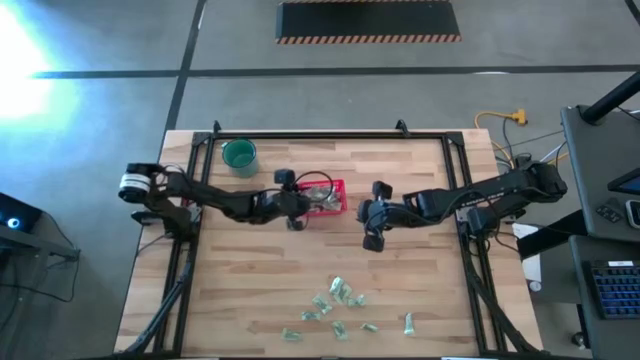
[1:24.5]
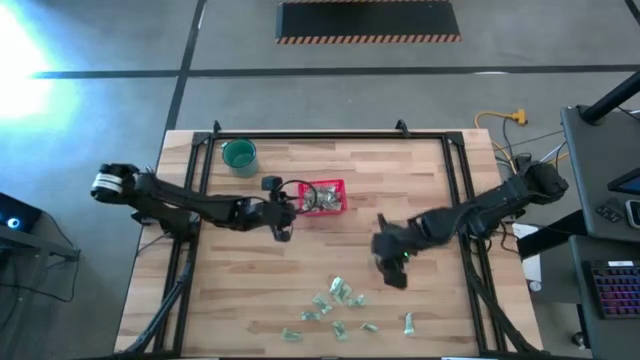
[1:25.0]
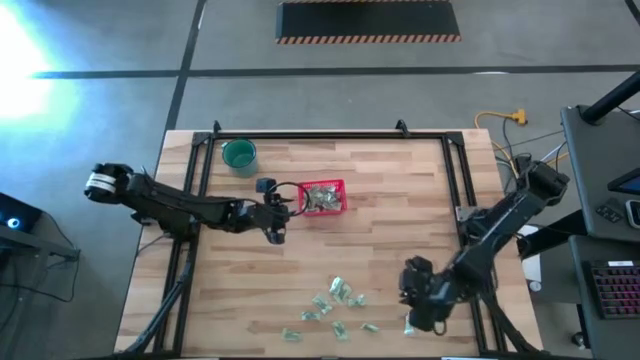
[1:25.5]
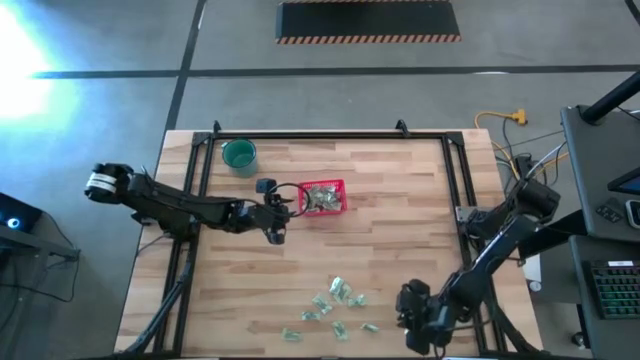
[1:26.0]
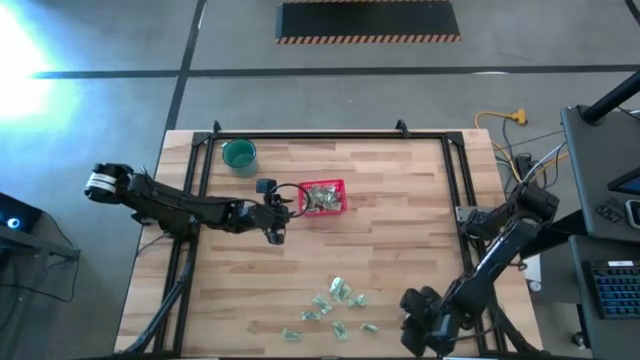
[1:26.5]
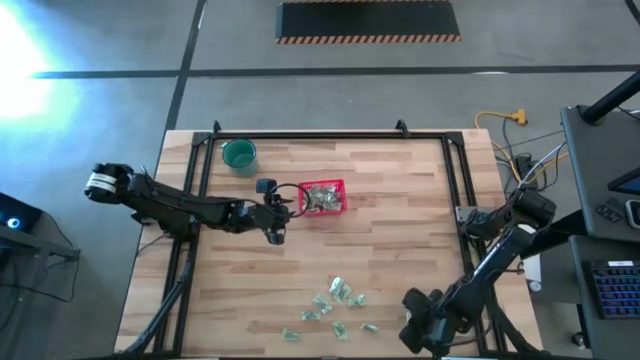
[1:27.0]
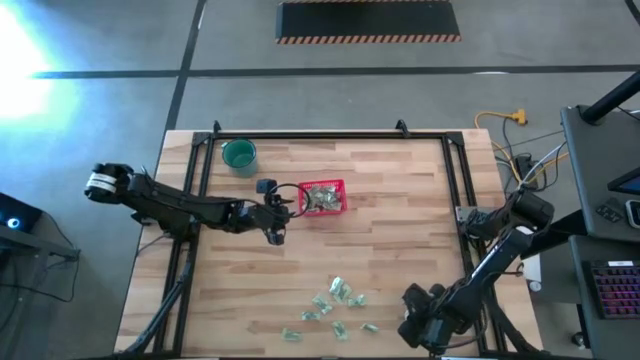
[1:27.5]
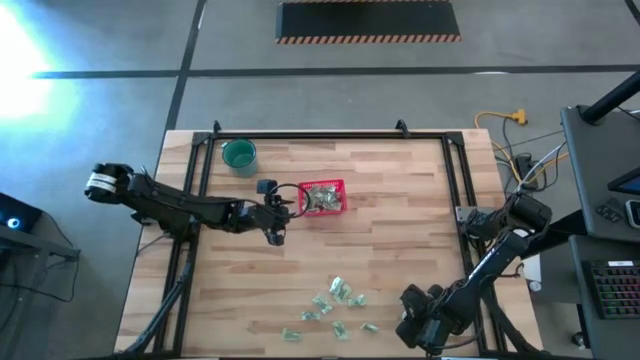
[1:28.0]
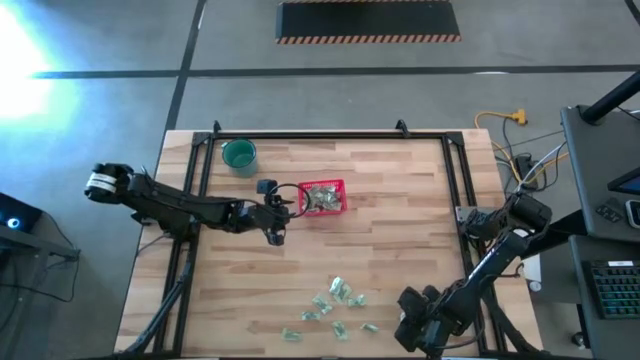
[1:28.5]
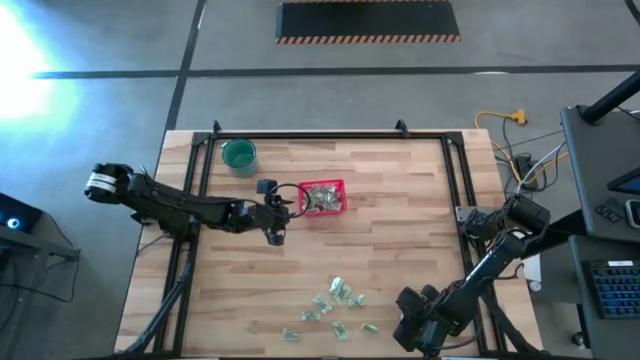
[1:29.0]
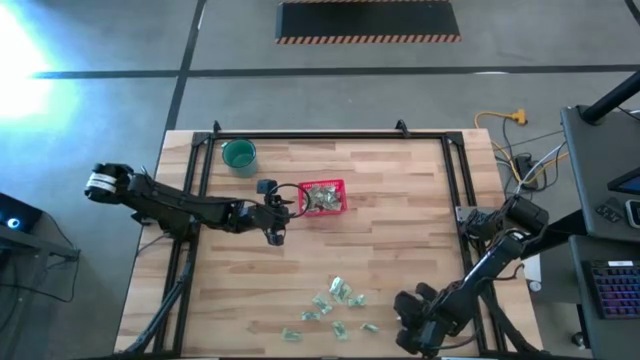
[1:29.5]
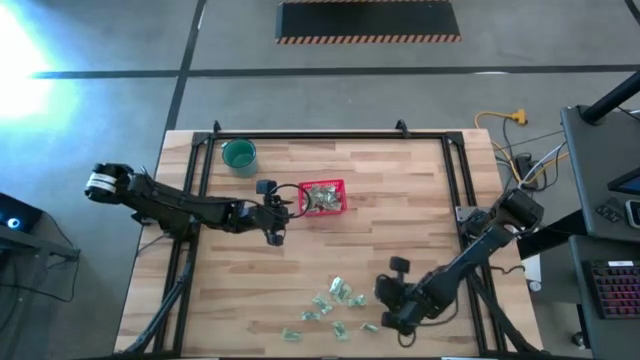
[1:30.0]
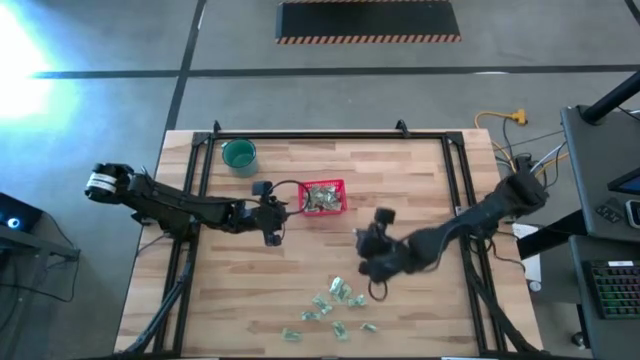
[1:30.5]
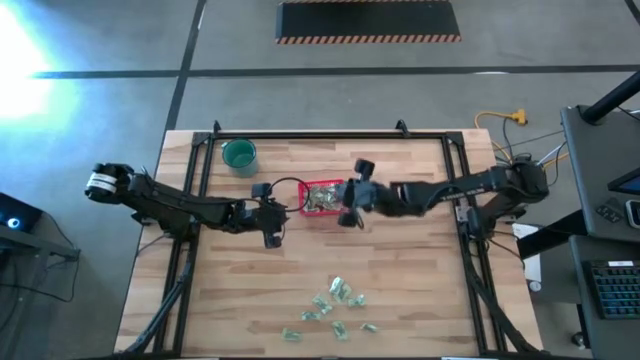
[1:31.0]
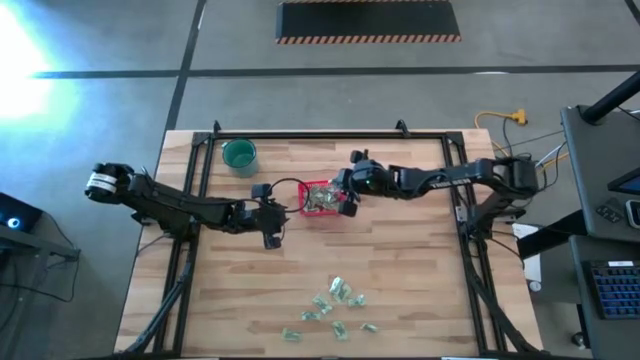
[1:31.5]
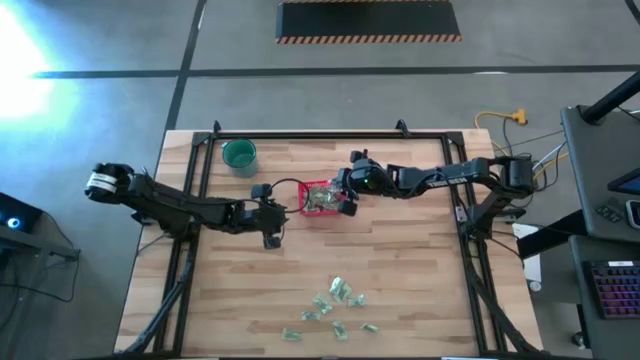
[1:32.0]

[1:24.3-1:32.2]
Task: Pick and place items into bin
Put the stevia packet into the red bin

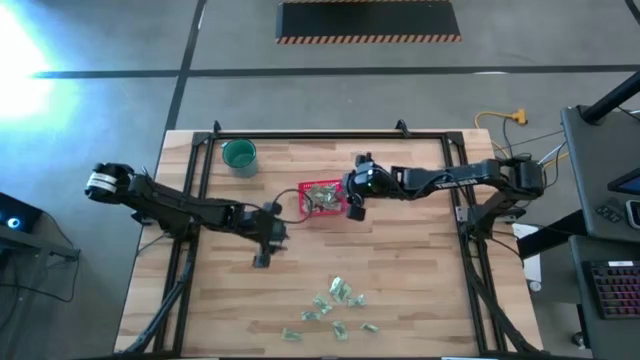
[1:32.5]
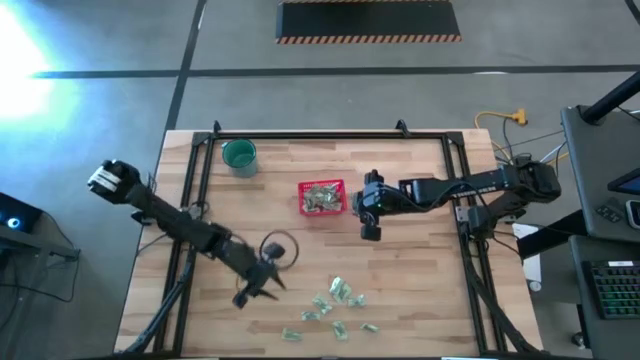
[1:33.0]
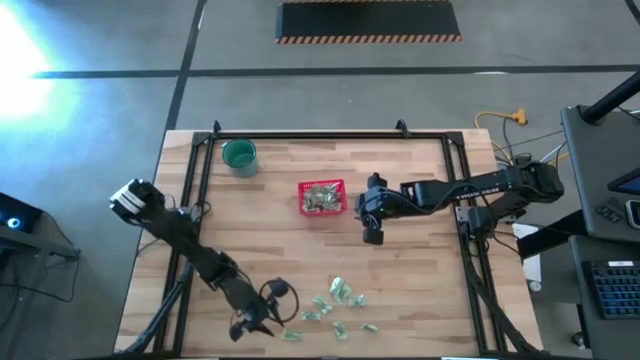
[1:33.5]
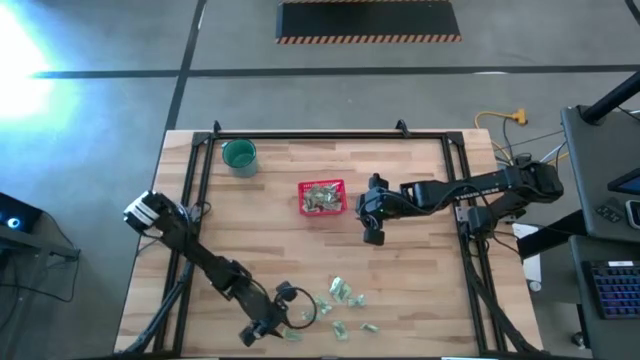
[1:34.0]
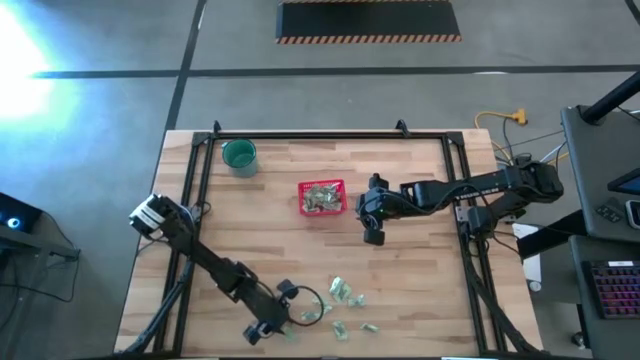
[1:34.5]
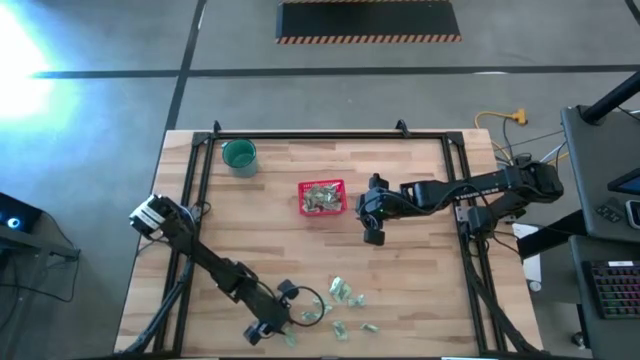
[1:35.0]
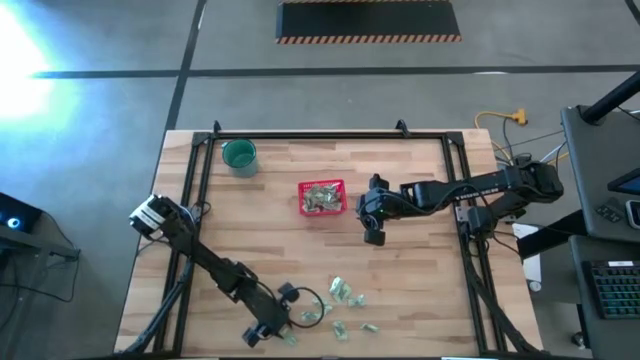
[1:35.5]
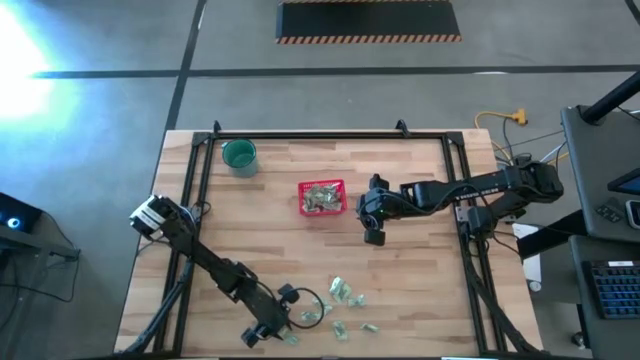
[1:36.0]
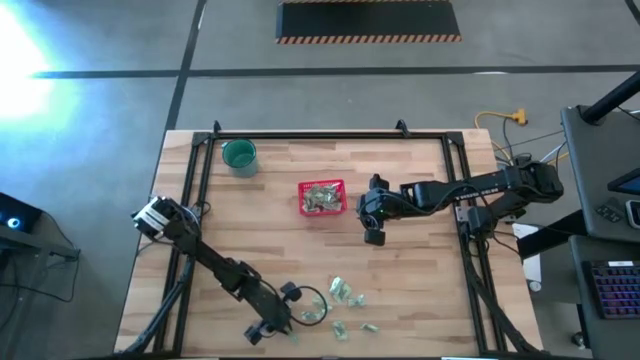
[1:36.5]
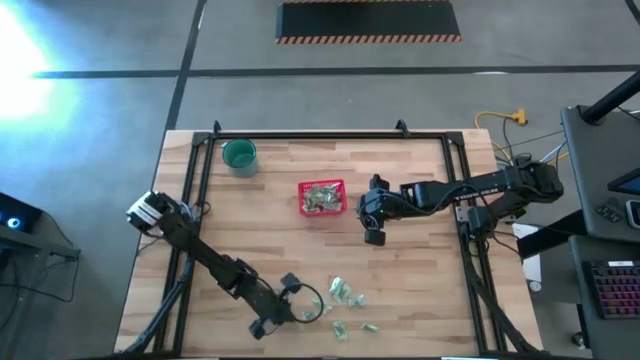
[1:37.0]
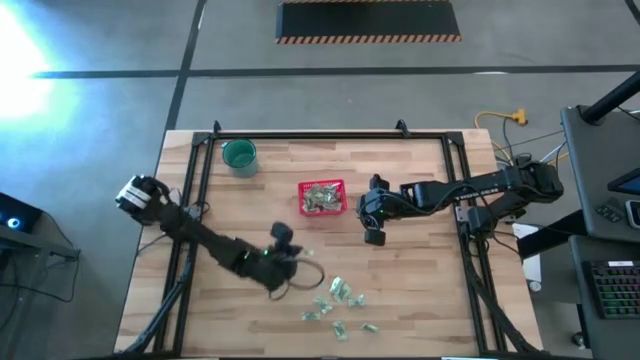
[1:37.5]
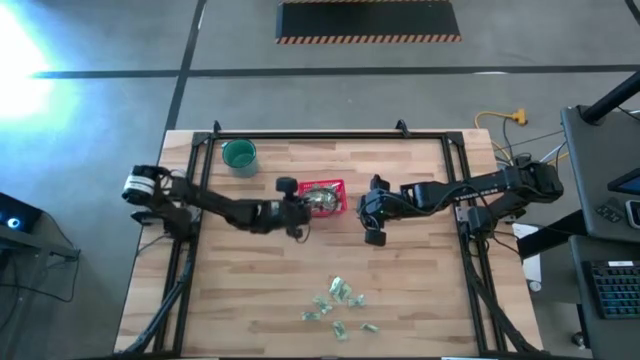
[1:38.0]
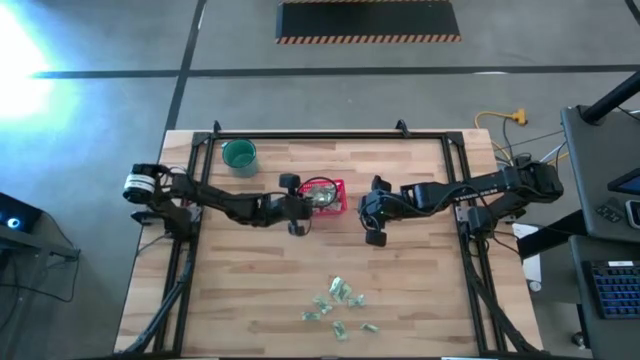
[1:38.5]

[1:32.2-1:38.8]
Put the stevia packet into the red bin

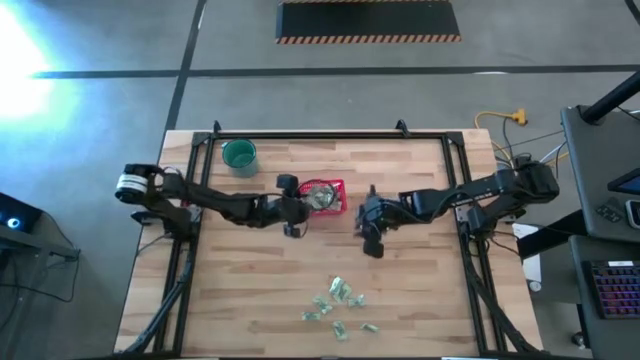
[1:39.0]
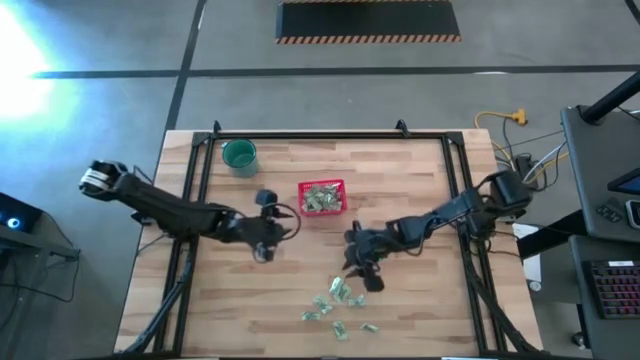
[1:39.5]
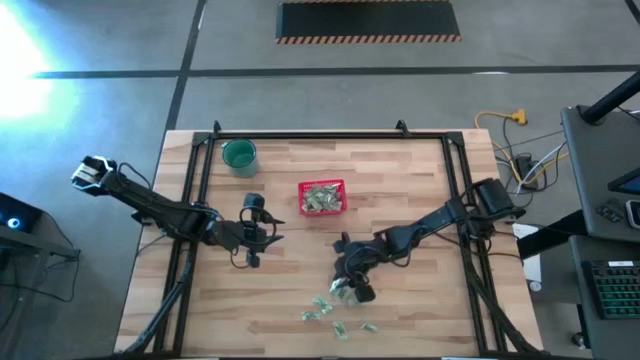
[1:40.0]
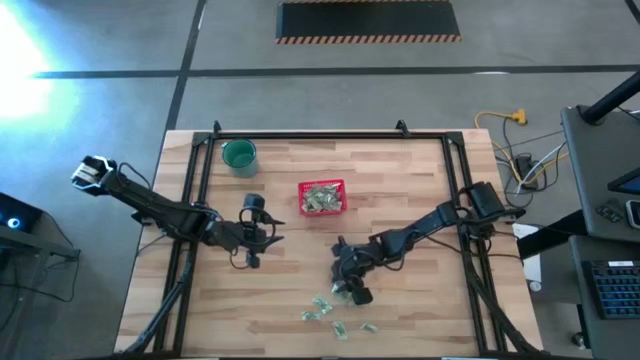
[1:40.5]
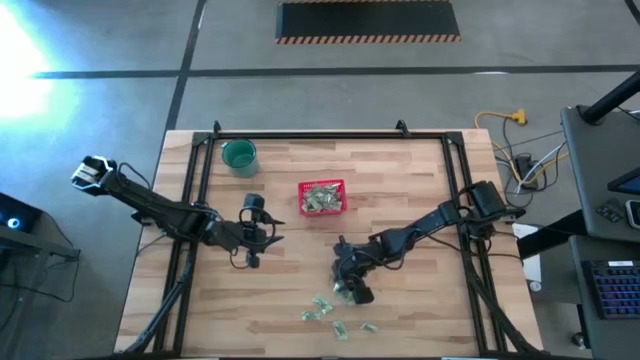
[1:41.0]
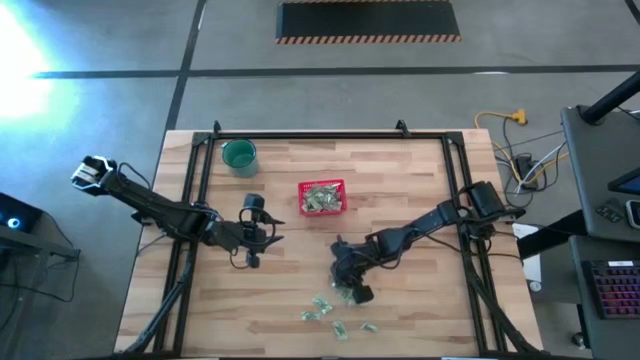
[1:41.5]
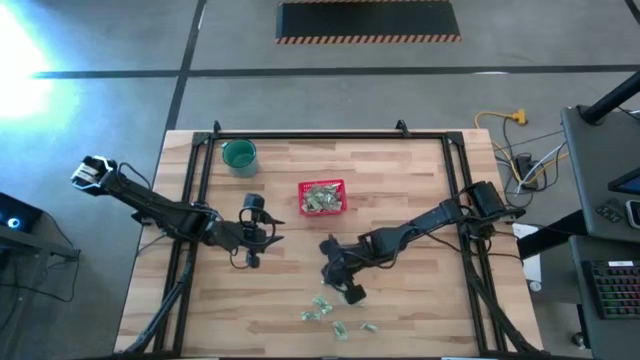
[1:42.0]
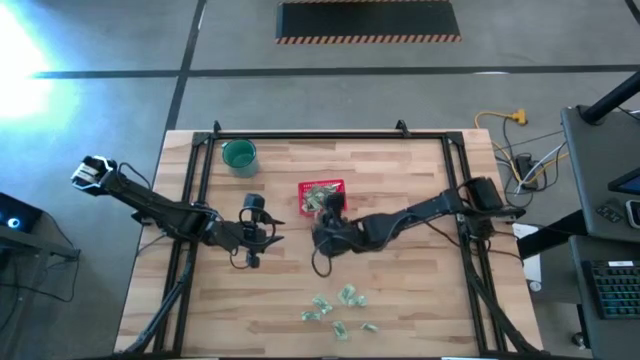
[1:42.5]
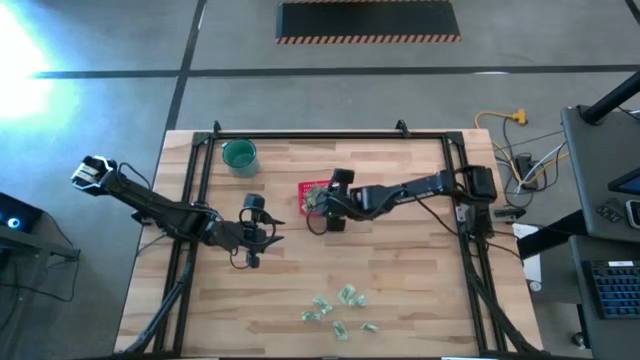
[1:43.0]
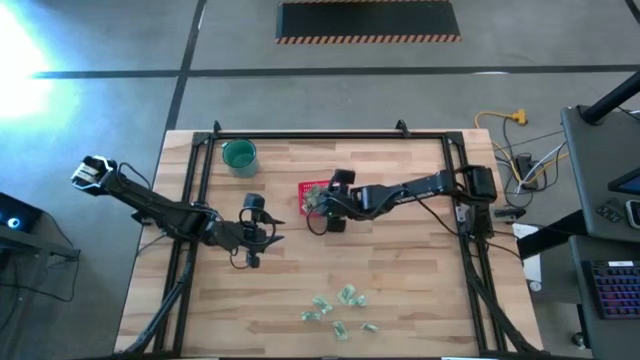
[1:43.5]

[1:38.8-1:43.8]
Put the stevia packet into the red bin

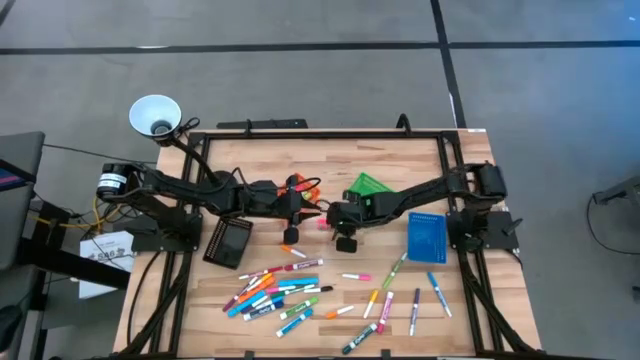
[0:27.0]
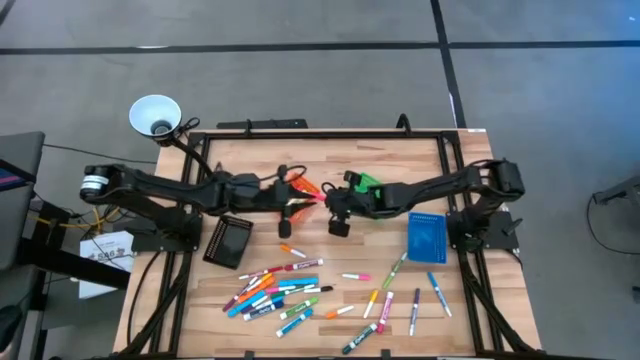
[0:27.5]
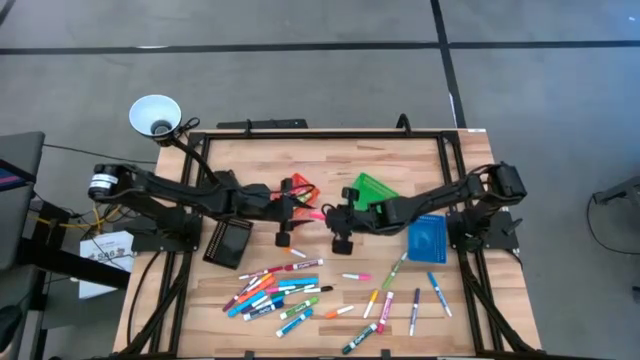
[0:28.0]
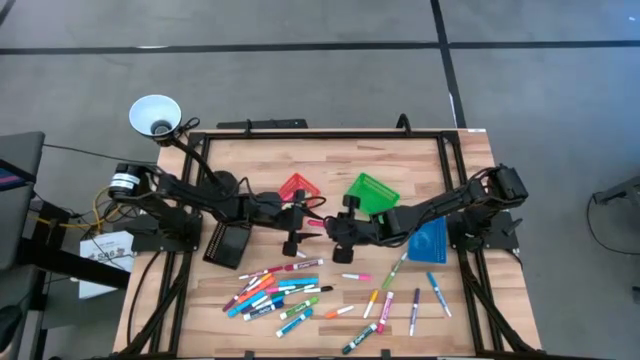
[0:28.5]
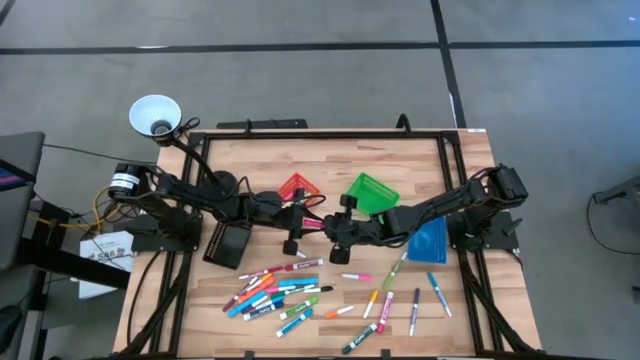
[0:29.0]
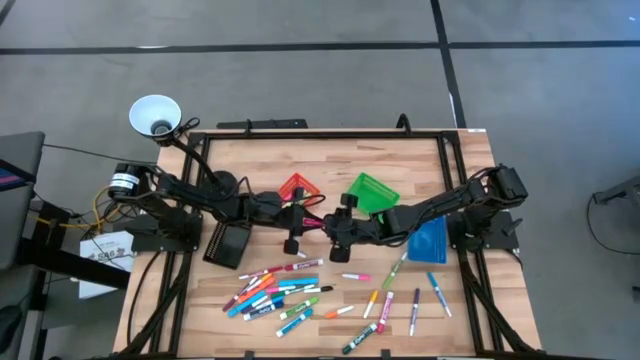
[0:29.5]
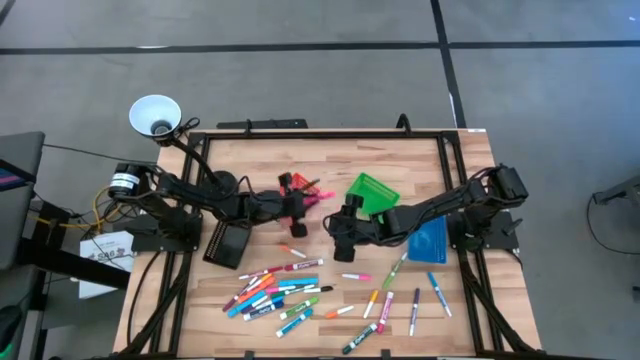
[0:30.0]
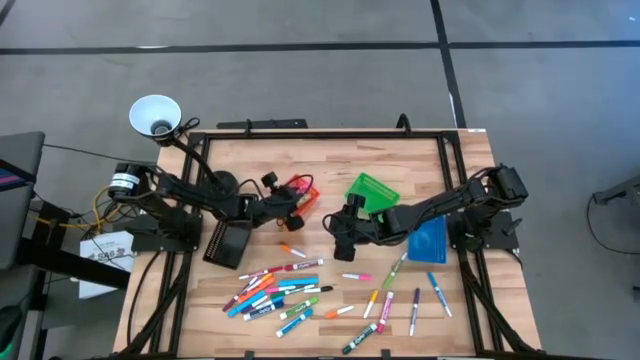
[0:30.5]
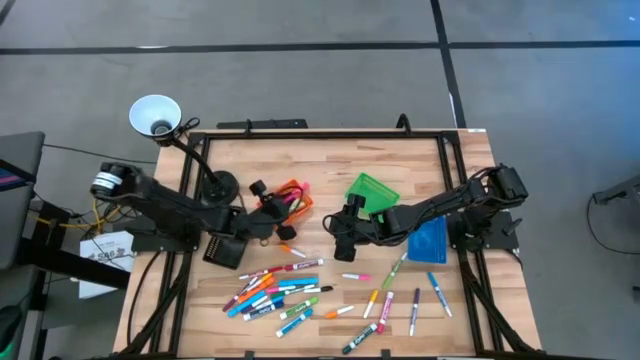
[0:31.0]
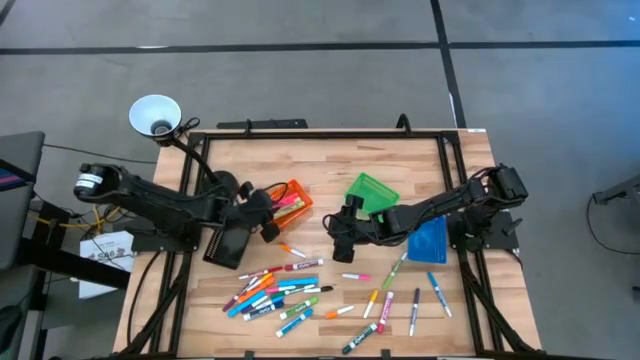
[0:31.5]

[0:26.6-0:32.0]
Task: Pick & Place Markers
Put the pink highlighter pen into the orange bin
